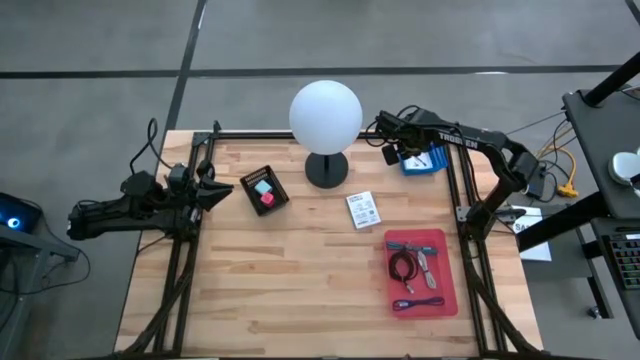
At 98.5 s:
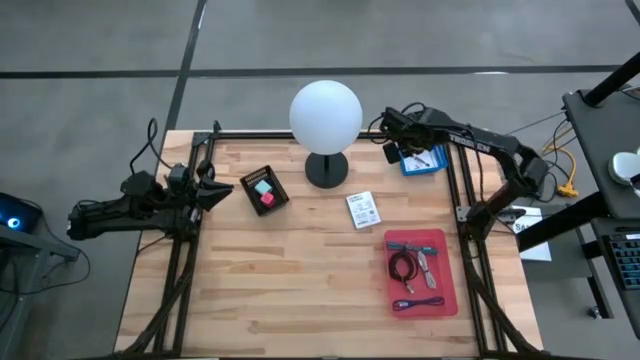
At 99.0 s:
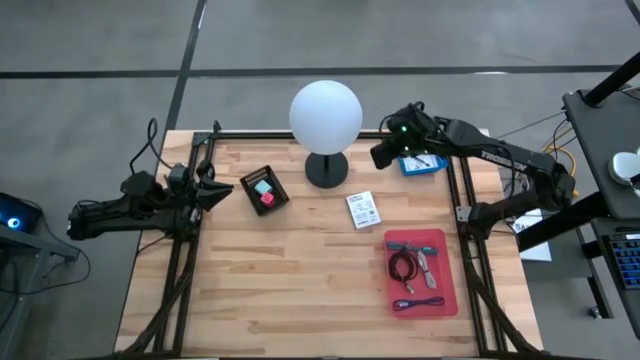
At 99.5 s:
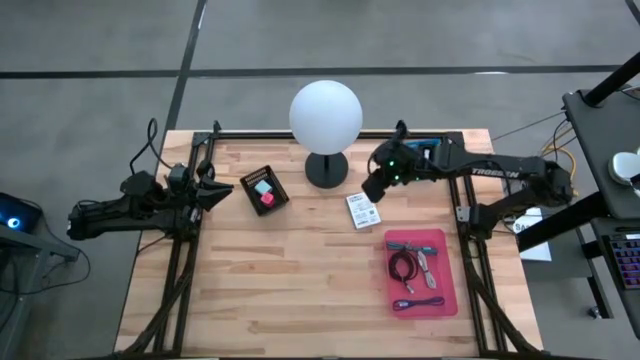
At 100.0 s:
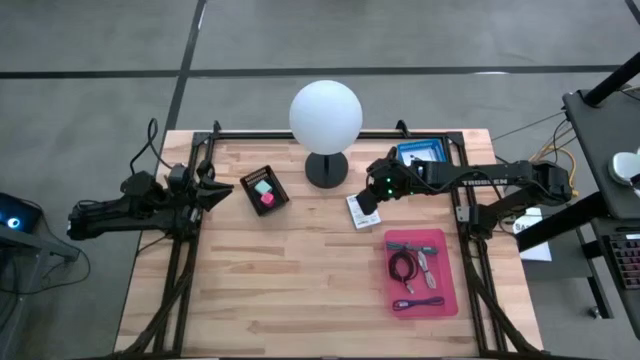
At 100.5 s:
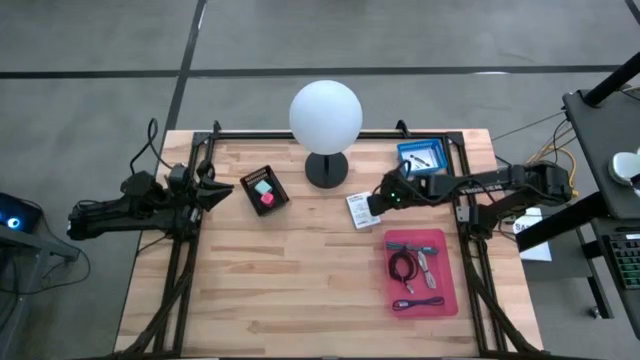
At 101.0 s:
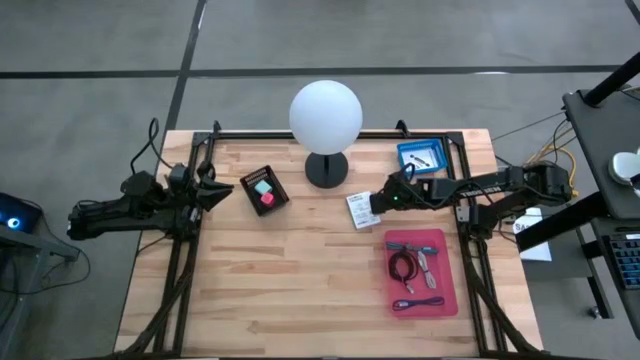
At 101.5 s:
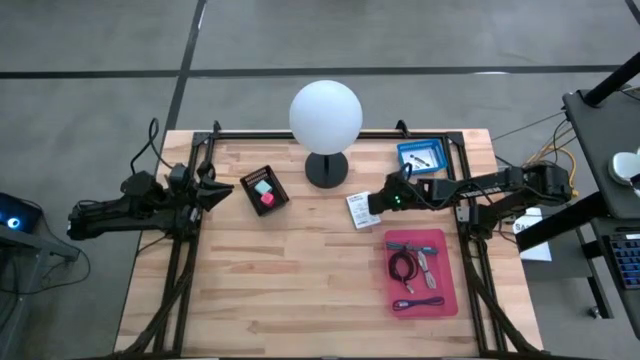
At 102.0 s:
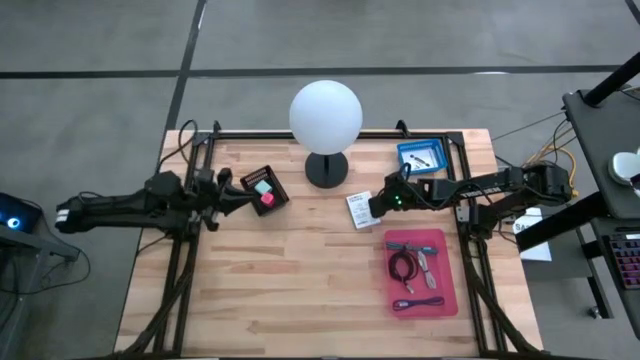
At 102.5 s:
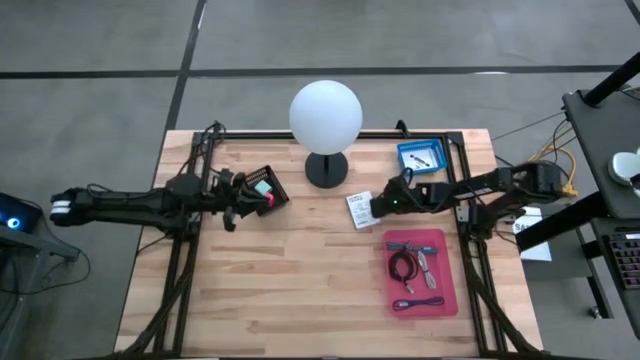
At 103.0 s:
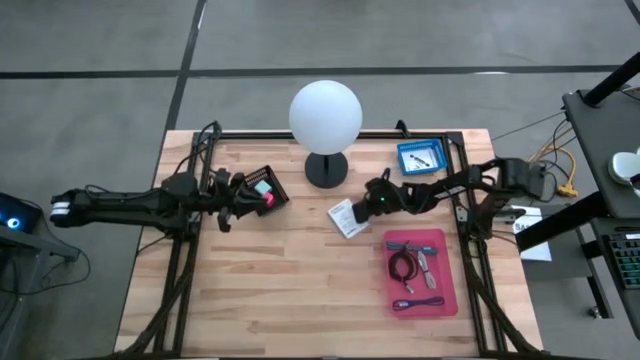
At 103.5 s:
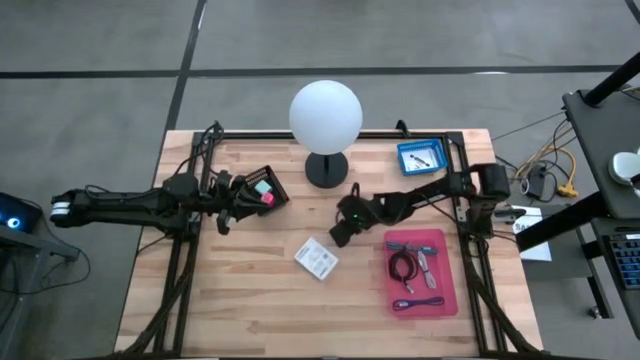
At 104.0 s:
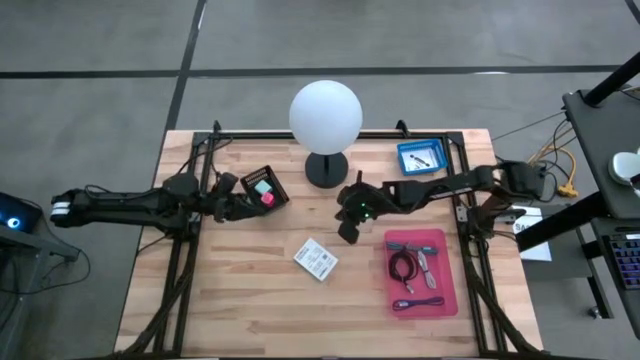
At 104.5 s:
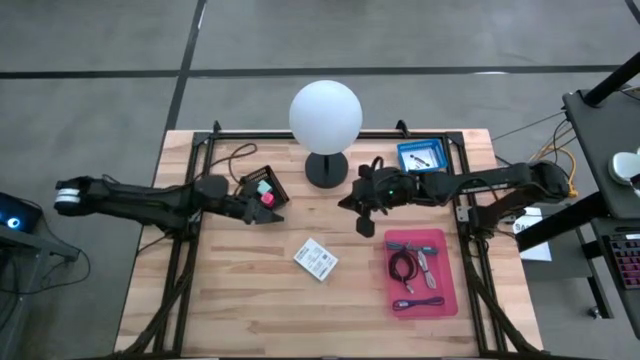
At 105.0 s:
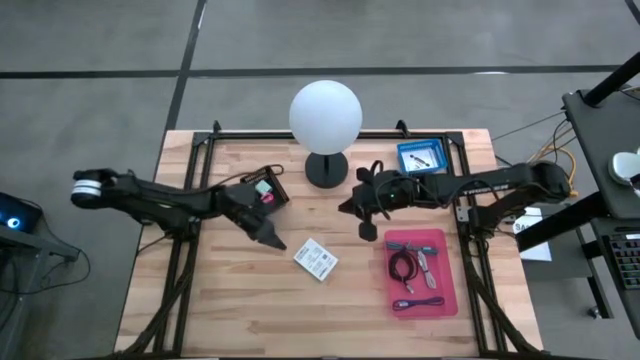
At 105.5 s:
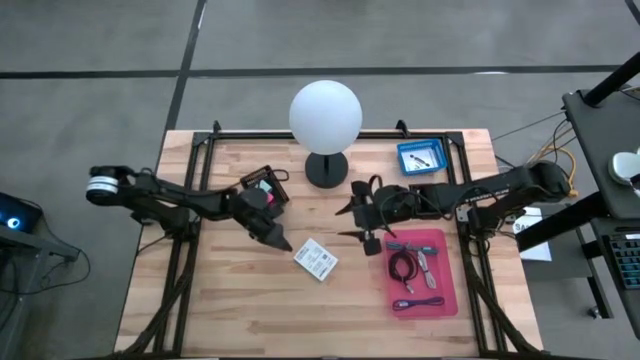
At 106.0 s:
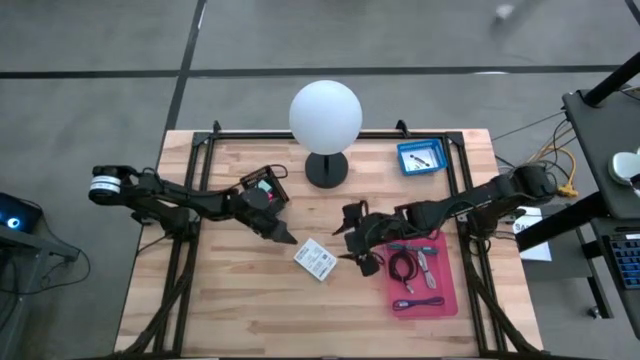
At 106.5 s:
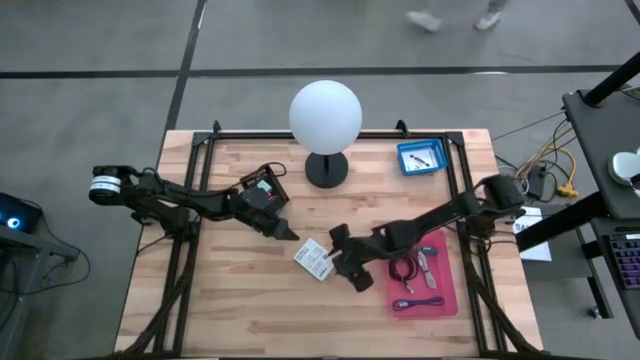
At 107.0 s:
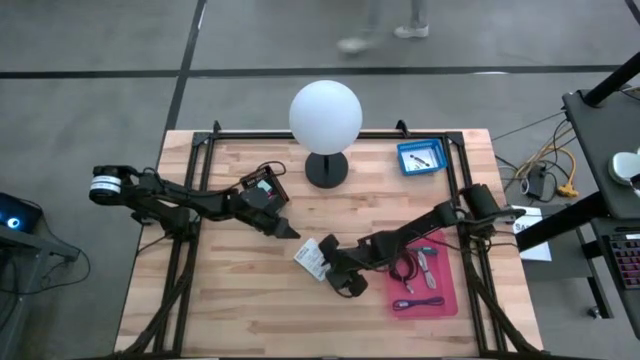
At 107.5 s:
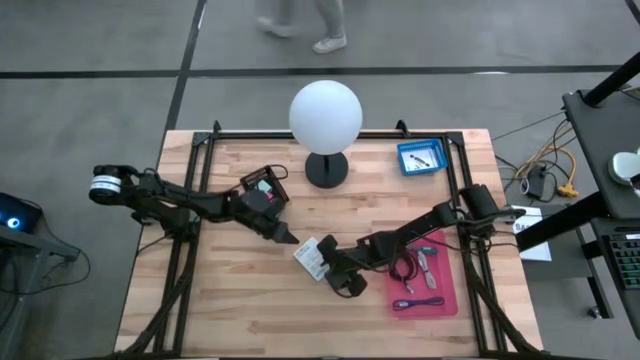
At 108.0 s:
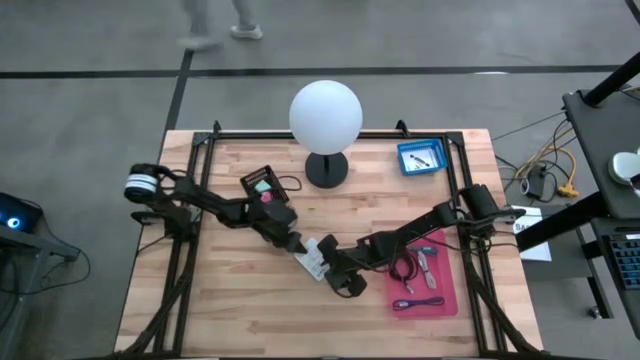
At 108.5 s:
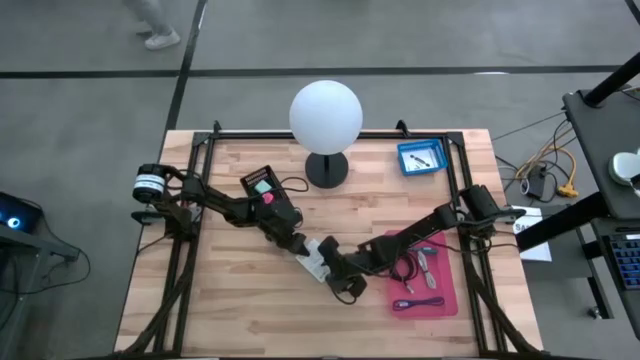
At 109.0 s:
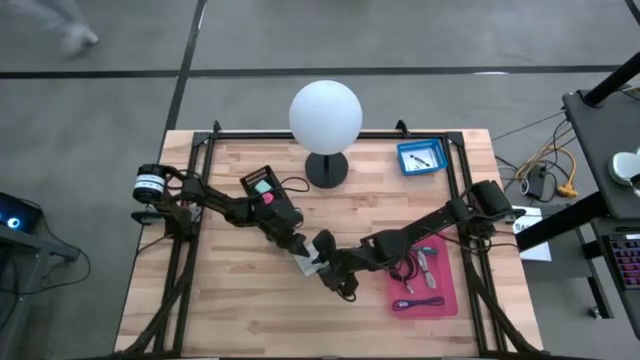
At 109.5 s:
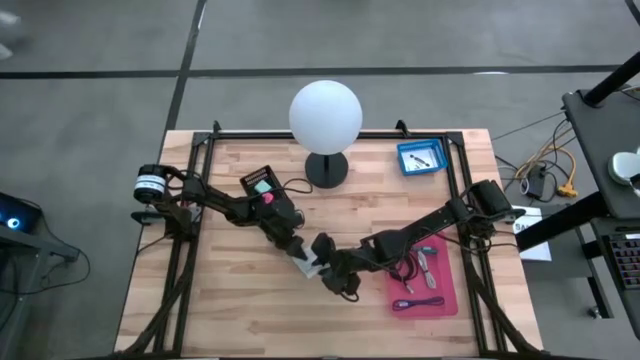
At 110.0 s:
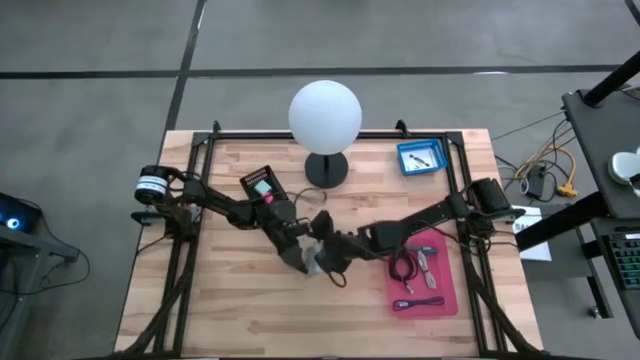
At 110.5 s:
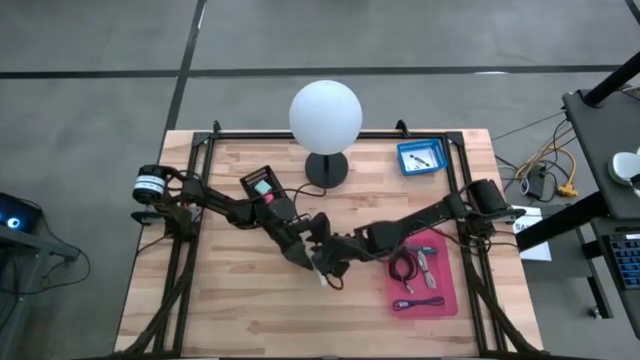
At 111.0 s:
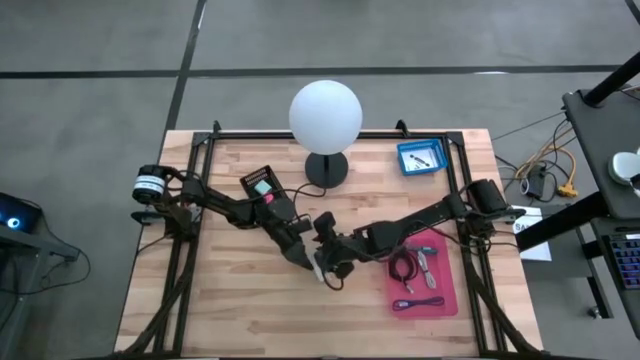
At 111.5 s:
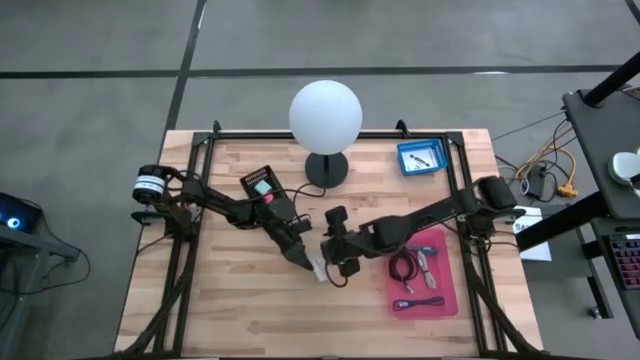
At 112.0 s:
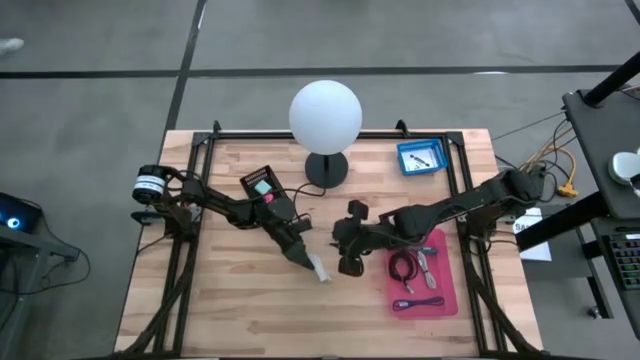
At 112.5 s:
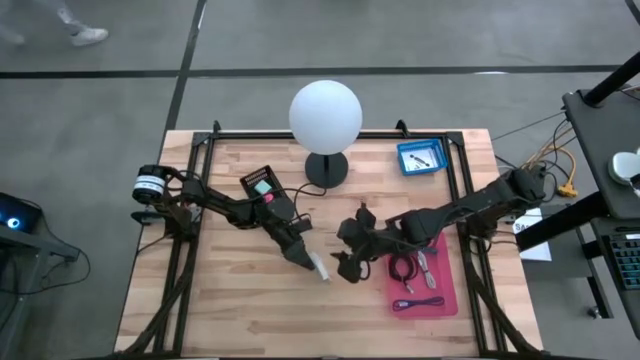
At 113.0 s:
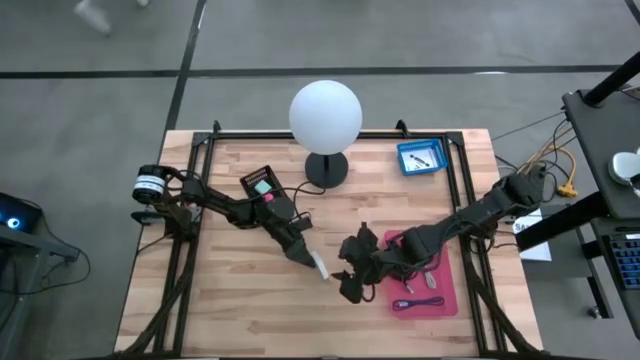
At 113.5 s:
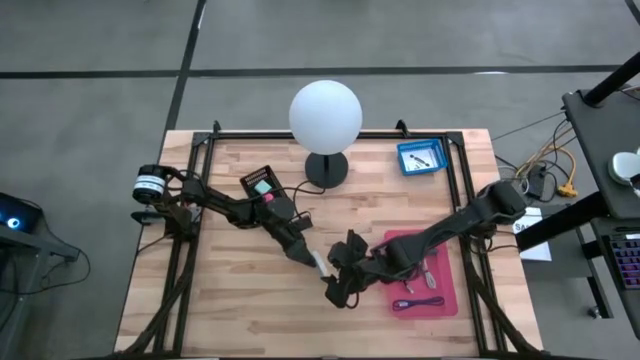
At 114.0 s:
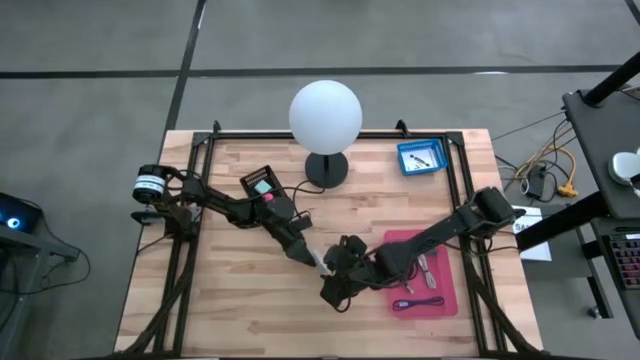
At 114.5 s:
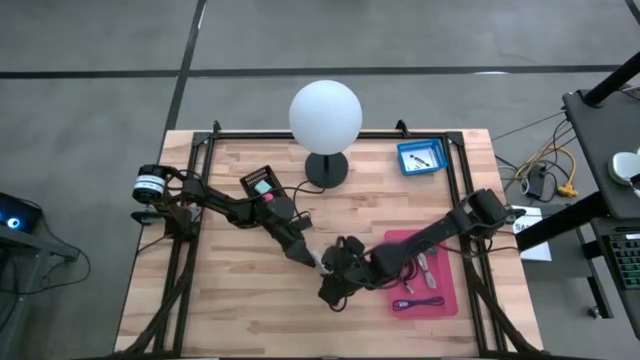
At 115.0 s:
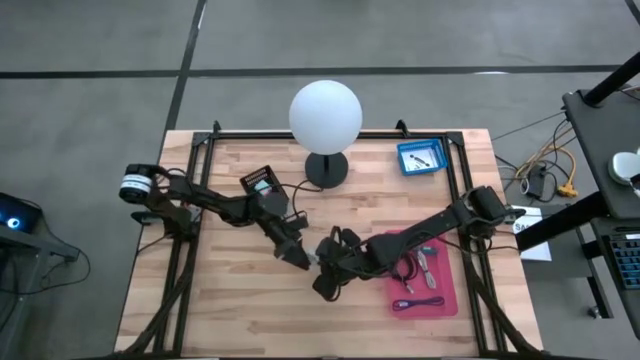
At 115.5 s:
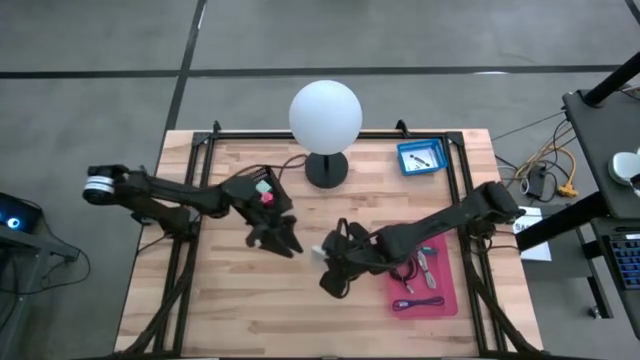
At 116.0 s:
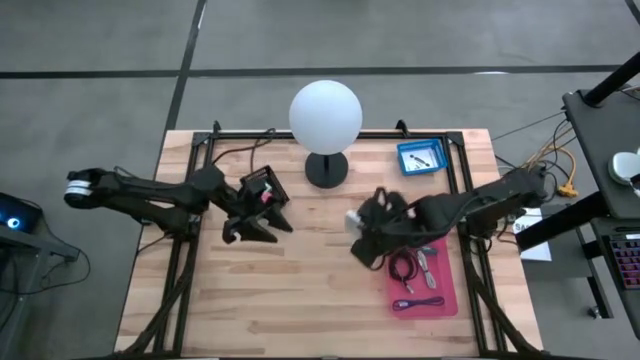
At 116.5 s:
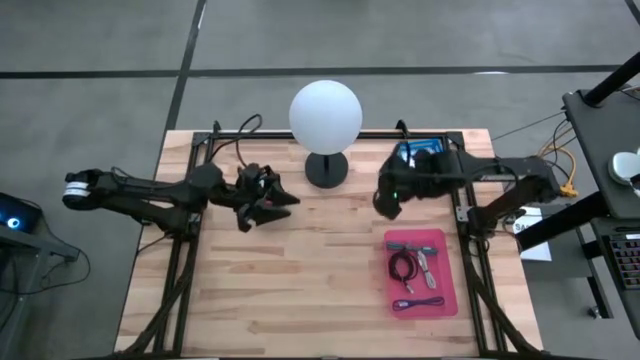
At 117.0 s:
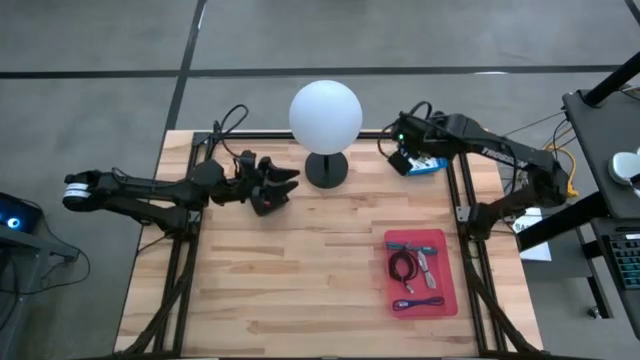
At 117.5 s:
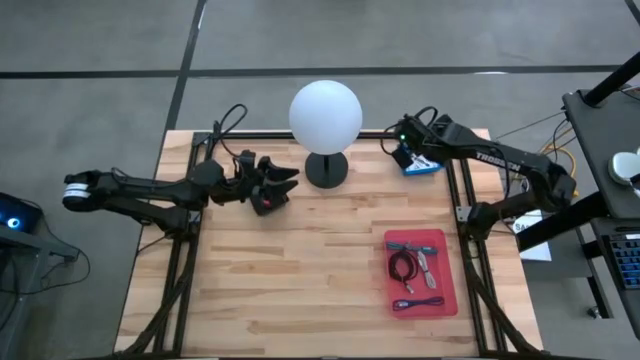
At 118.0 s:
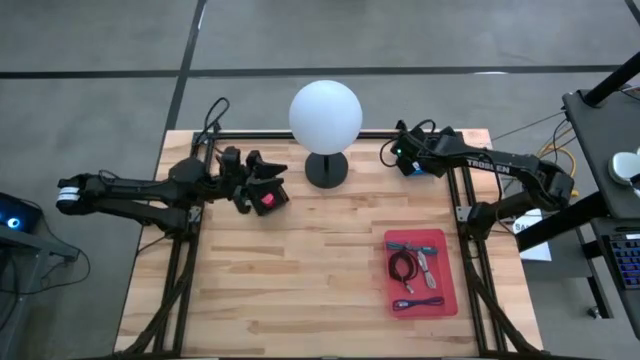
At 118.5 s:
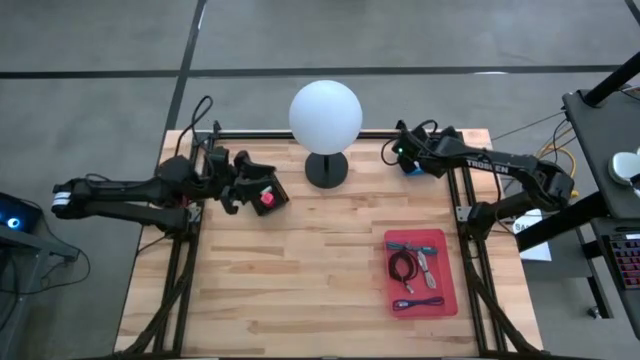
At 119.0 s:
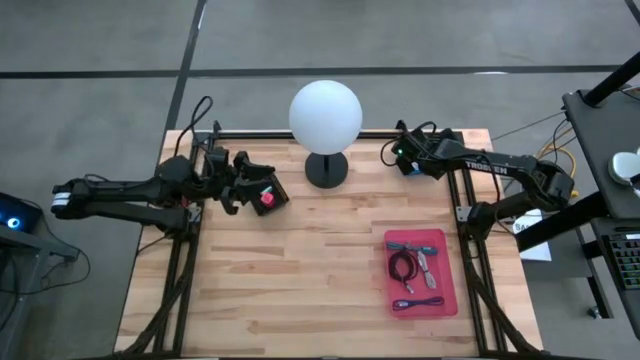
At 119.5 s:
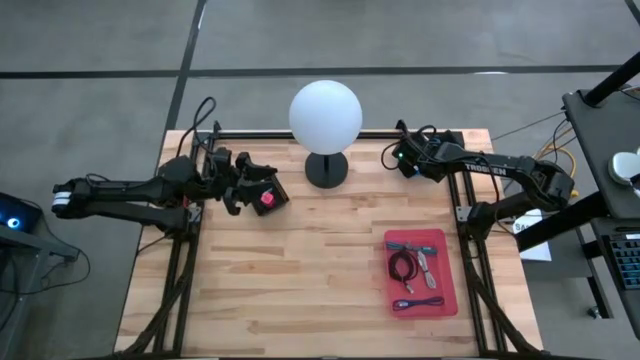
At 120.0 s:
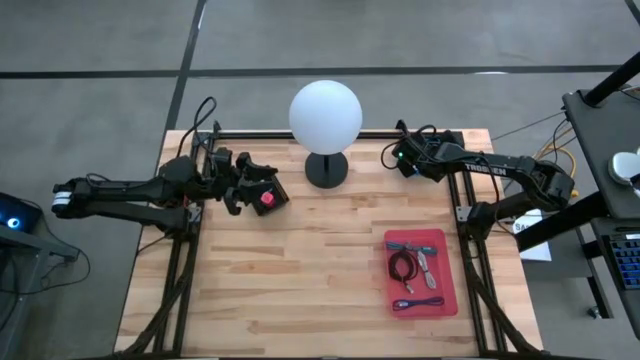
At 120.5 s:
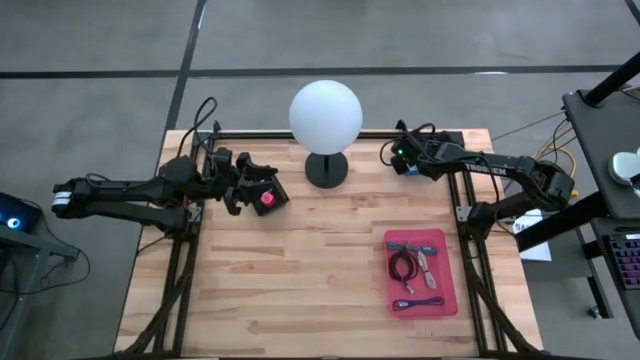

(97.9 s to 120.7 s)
Task: Pick and place items into bin
Put the white card reader box into the blue bin
